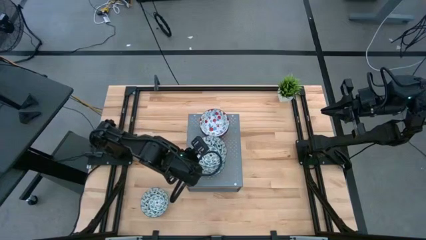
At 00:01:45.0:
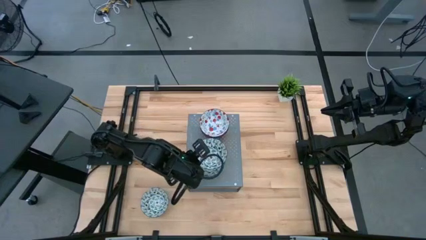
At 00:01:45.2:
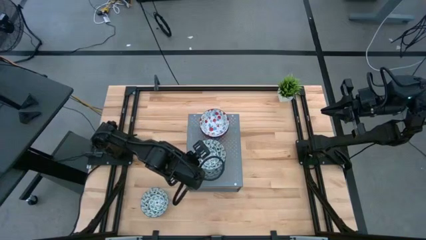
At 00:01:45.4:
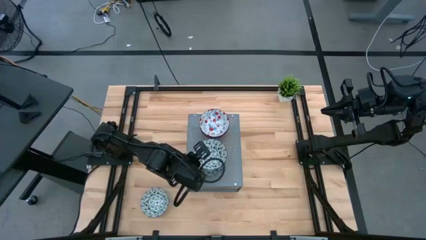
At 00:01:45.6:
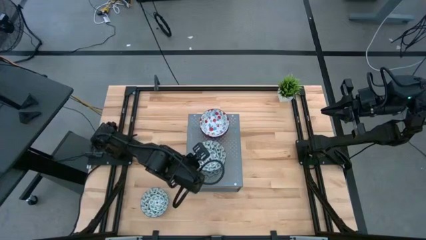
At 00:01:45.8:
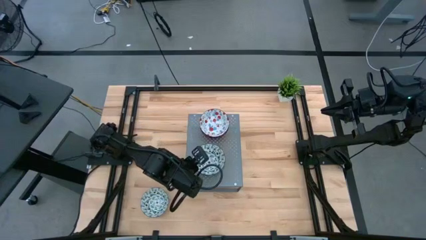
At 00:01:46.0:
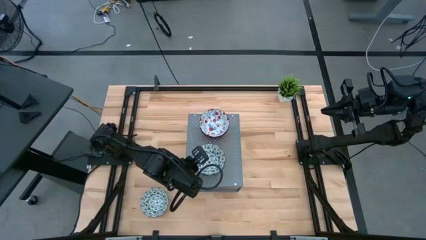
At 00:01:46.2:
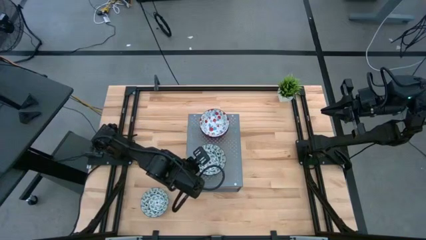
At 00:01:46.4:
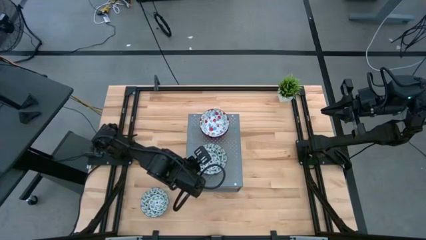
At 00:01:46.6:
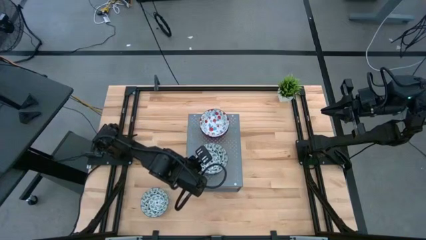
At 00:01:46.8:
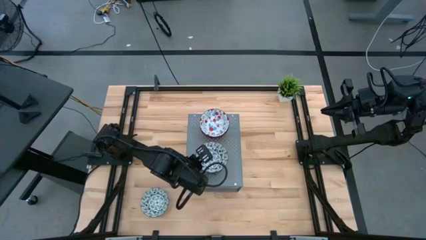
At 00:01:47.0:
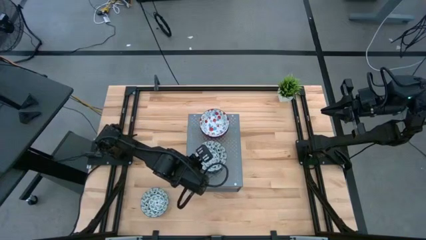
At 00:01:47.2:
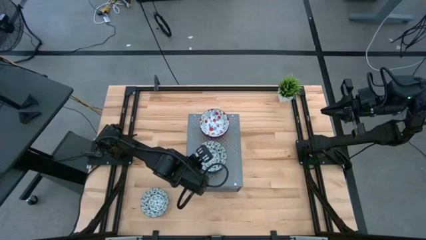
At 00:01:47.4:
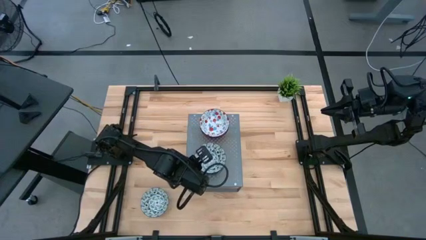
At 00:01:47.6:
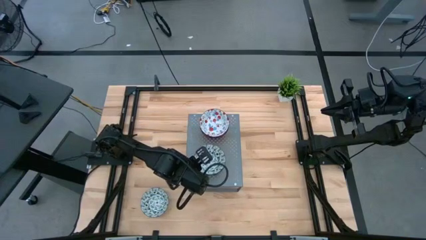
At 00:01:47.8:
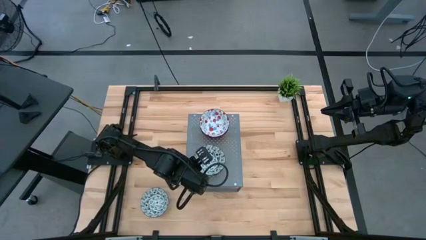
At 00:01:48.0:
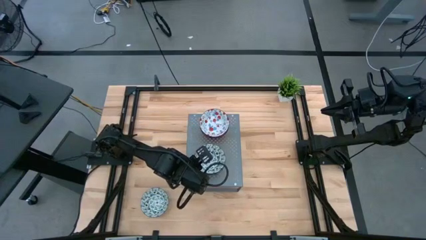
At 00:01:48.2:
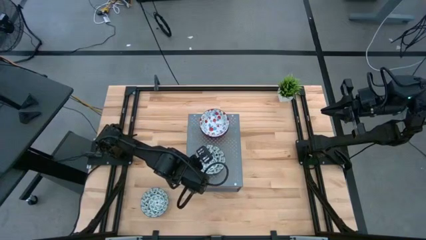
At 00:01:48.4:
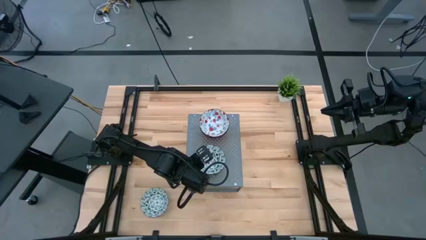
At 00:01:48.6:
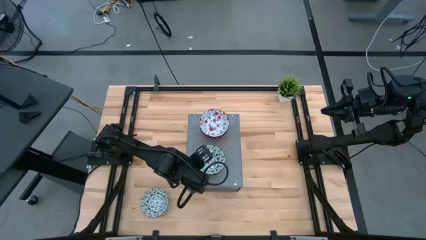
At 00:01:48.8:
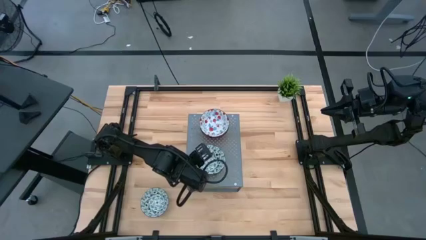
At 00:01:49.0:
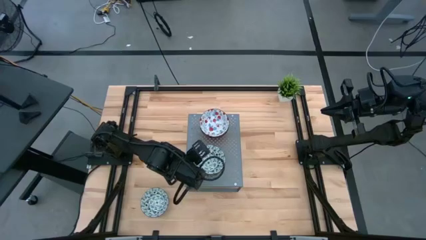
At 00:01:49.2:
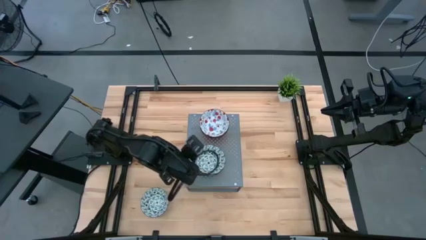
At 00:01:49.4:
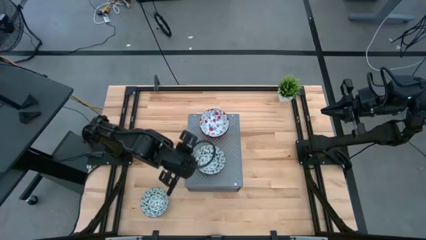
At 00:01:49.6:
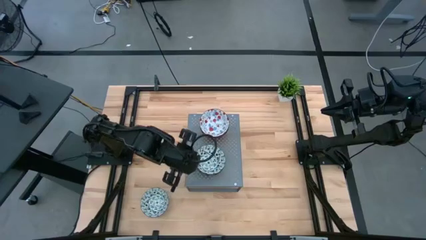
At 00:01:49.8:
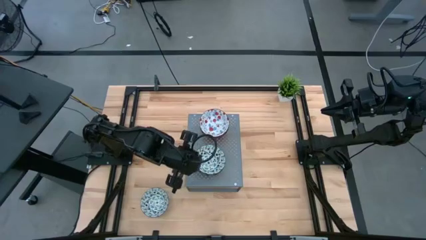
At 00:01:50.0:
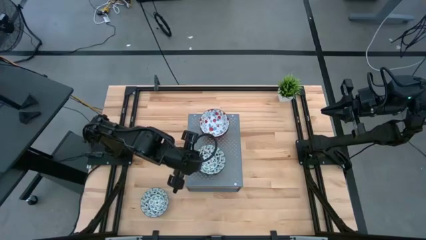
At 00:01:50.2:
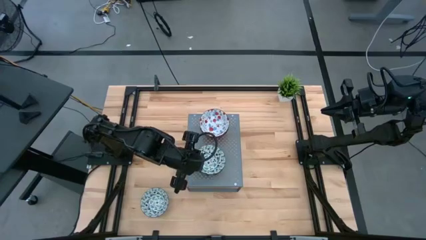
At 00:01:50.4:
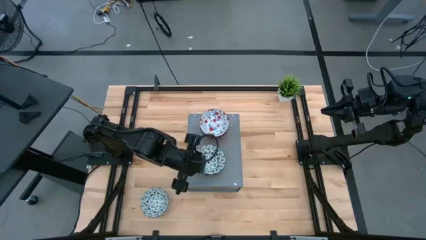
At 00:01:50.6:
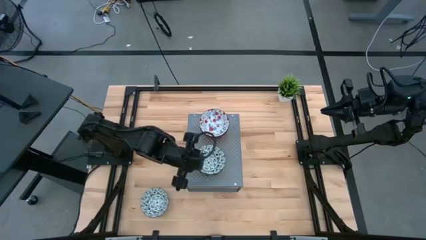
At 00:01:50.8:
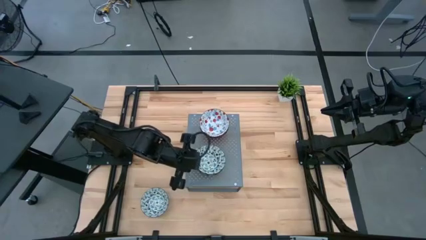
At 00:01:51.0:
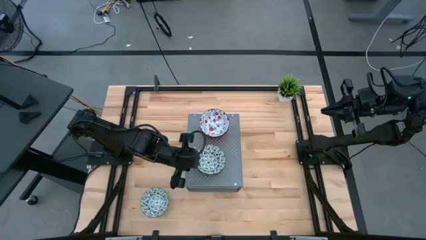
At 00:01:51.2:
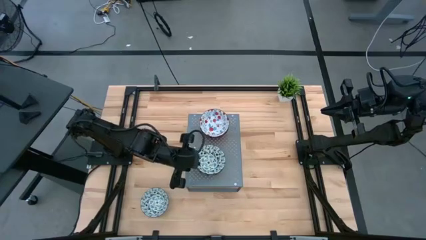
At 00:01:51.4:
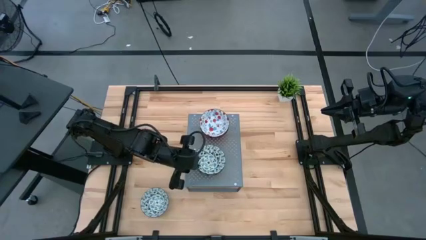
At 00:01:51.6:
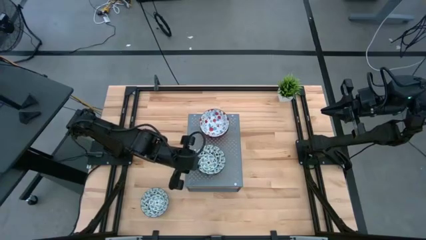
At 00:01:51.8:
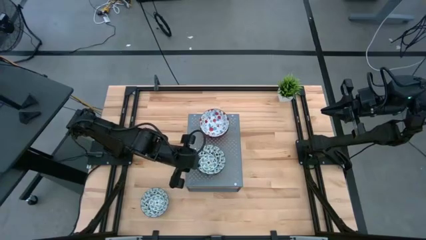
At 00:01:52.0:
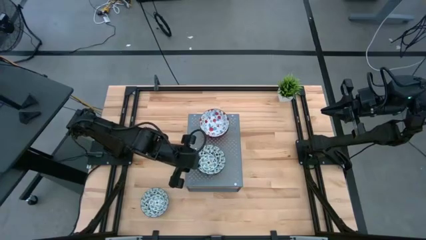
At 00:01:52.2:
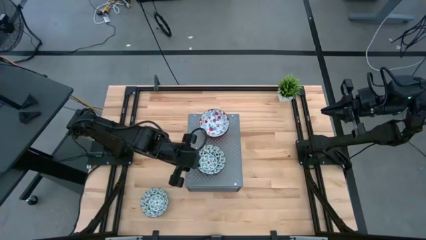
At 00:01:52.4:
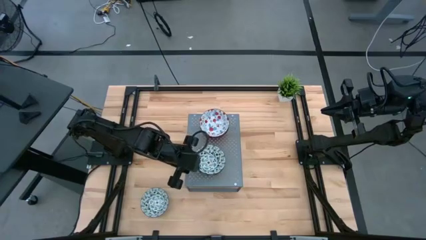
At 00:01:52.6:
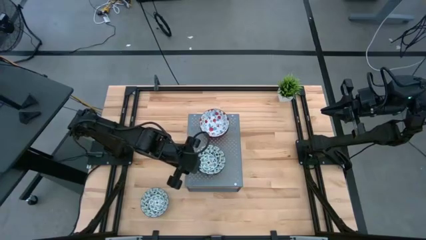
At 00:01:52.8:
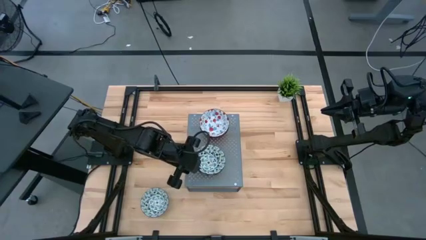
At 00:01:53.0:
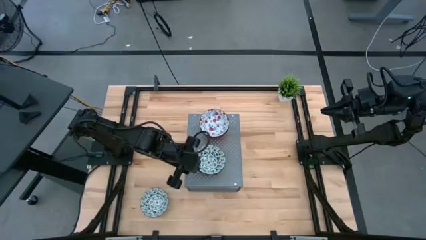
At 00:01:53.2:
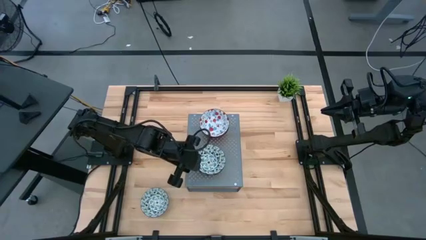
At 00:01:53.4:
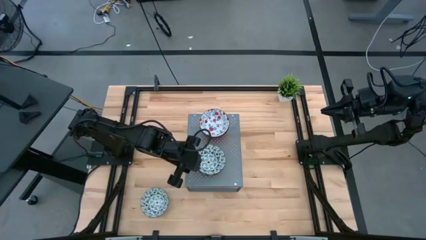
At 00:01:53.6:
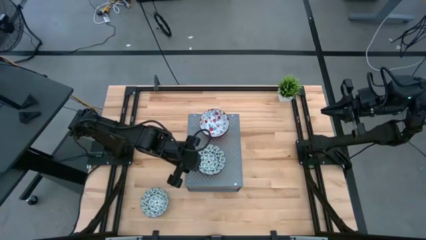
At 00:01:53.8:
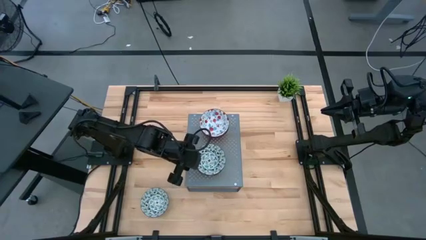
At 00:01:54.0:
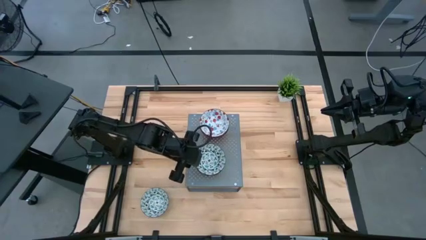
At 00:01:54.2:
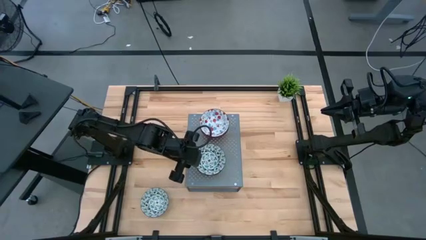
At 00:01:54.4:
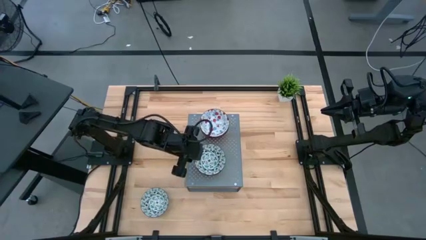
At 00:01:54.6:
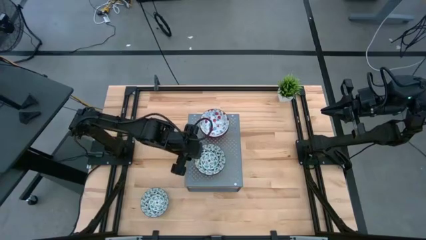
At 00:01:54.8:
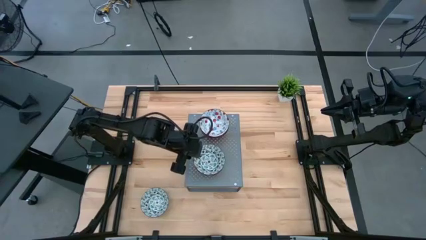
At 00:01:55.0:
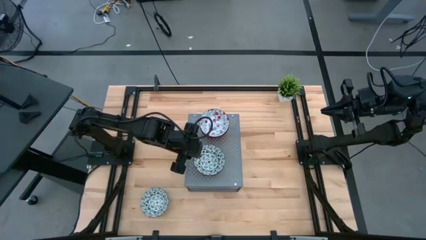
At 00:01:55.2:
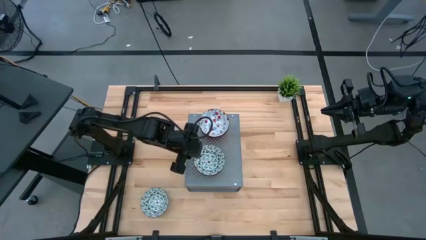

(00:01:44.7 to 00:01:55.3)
Task: Pick & Place Mini bowls
Put the top green bowl on top of the green bowl on the shelf

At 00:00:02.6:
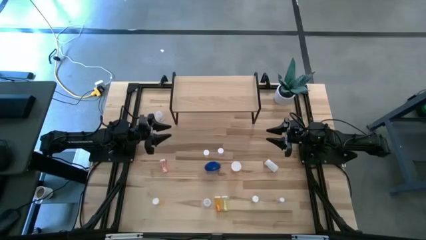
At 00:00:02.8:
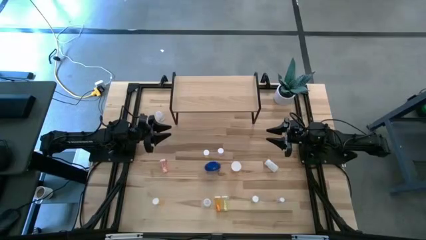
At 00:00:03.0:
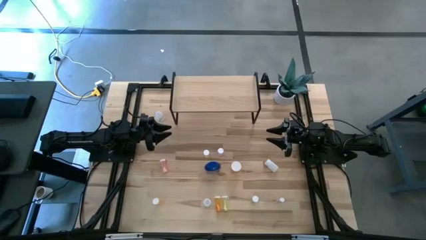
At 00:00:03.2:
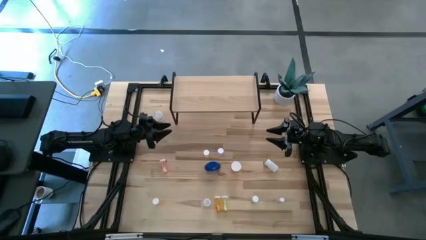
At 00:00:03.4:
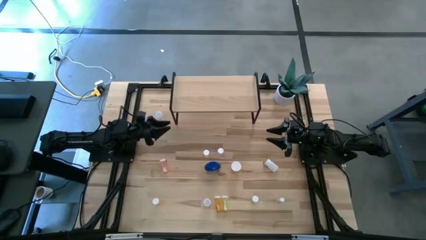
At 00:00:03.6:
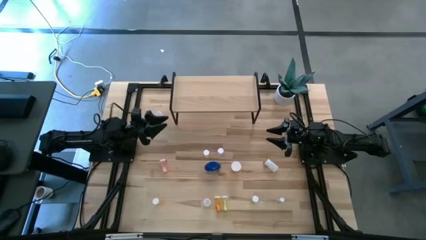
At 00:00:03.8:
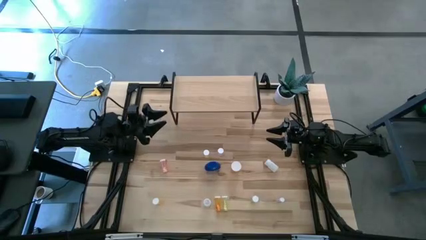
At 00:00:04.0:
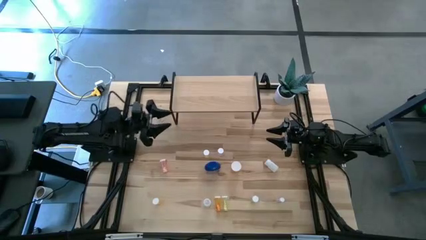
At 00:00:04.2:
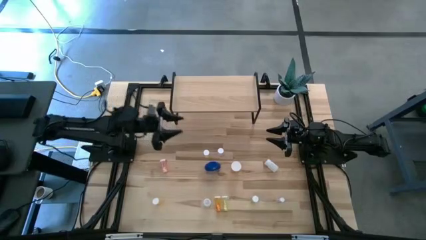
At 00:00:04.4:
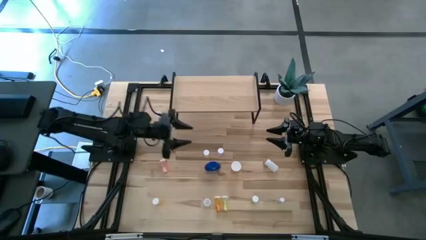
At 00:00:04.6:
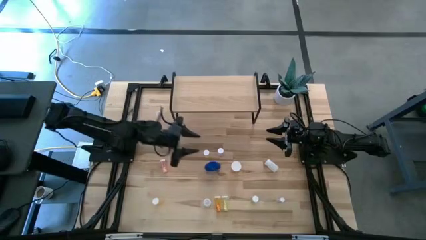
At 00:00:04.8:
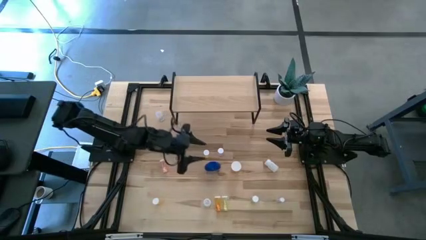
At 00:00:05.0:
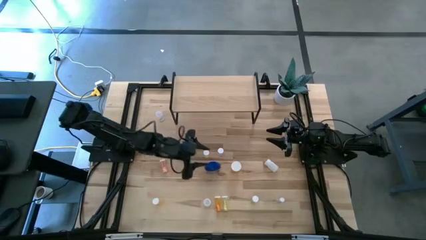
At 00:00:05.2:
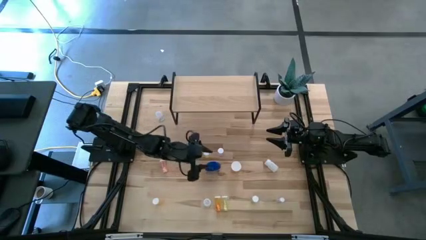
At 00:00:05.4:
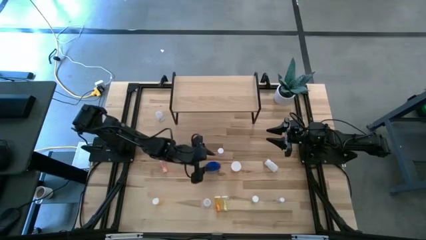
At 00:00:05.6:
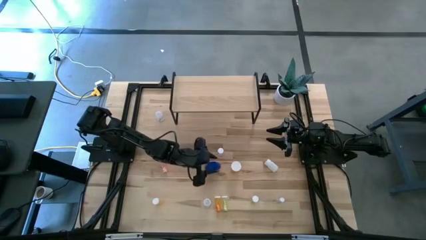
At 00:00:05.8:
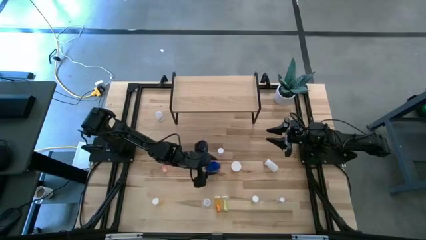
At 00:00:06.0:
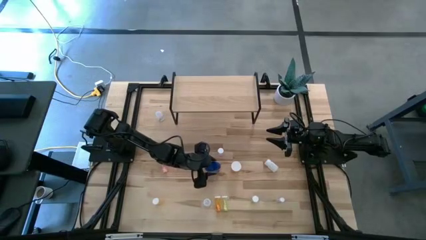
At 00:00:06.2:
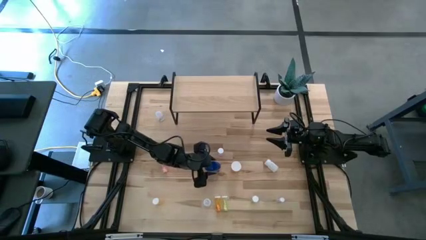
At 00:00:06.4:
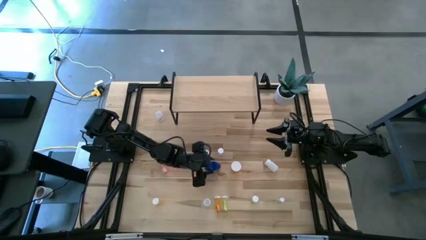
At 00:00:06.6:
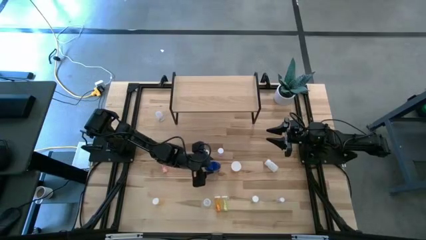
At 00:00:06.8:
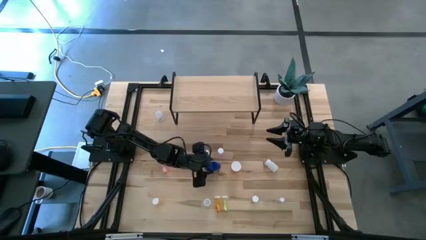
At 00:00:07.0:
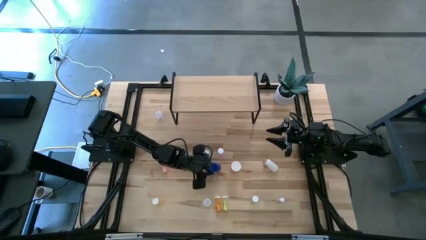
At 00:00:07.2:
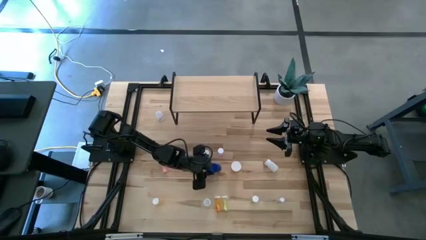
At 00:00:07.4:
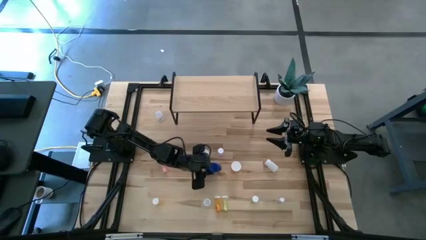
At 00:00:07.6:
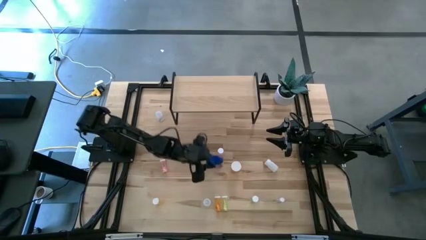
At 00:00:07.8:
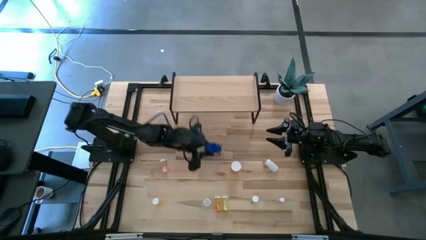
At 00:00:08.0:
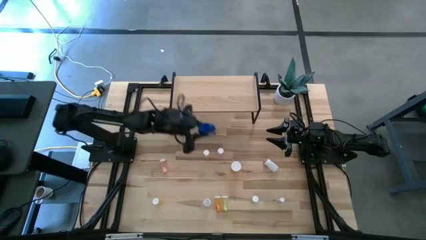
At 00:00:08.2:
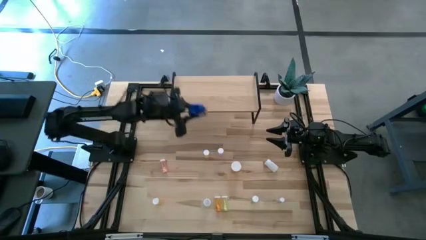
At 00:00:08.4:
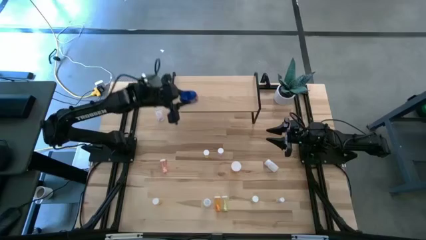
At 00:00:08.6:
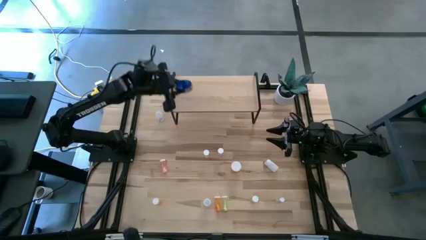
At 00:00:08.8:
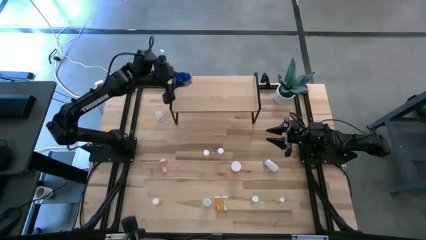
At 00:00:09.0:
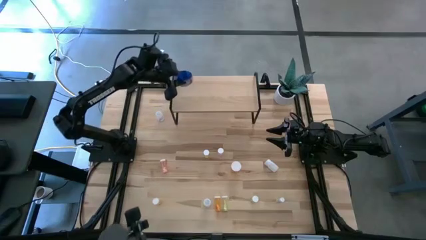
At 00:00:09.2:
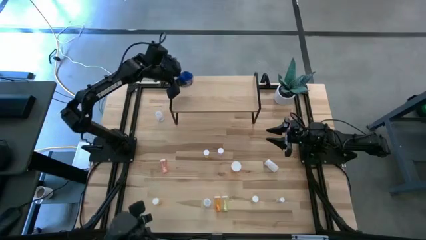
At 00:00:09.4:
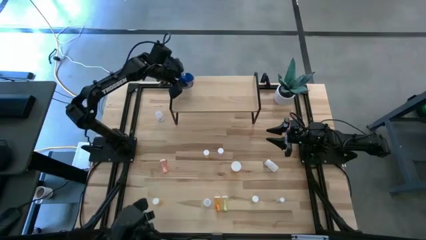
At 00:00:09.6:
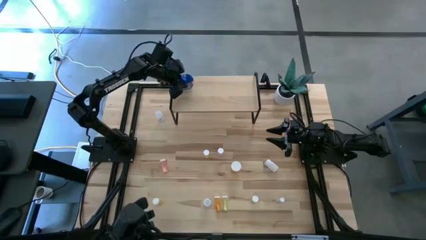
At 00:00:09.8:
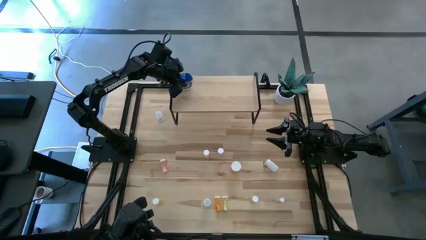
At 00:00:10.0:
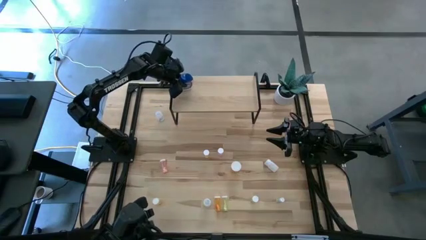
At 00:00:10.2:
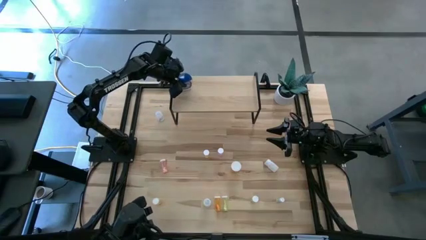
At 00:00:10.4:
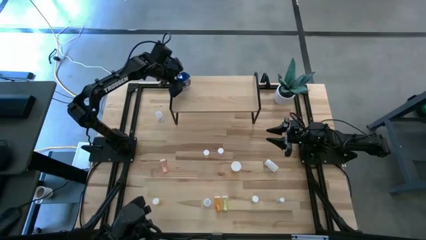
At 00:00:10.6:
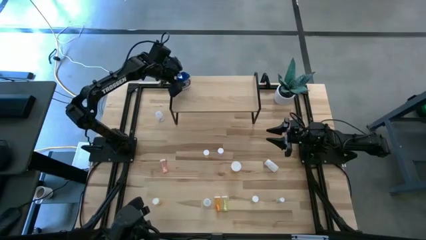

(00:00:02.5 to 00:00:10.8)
Task: Pick and place medicine bottles onto shelf by color
Put the blue pill bottle on the shelf
